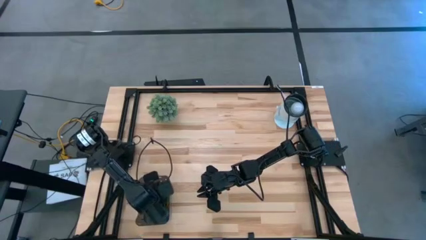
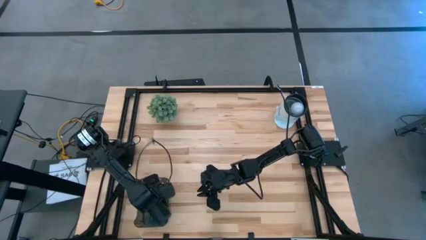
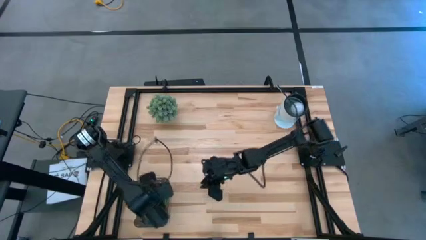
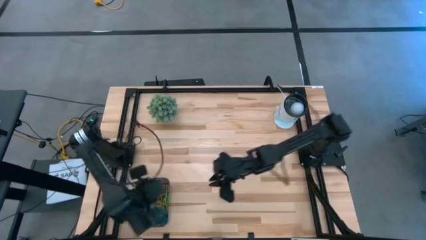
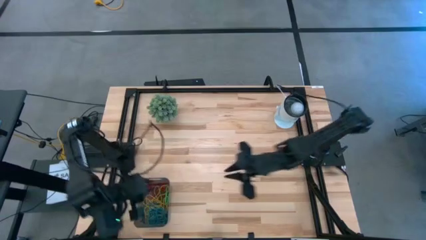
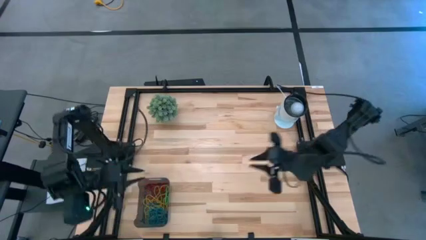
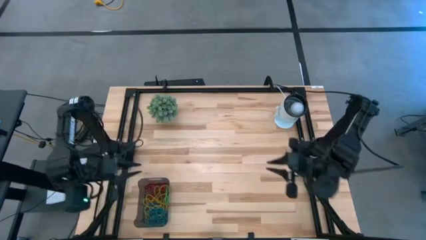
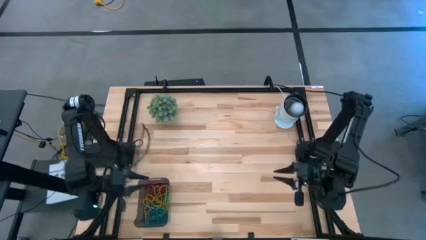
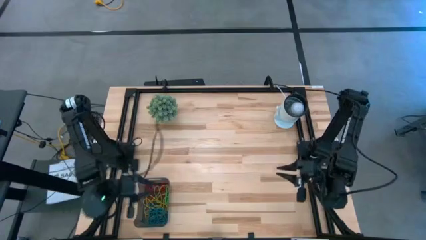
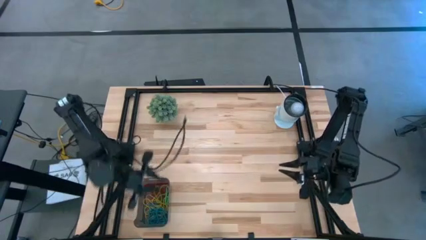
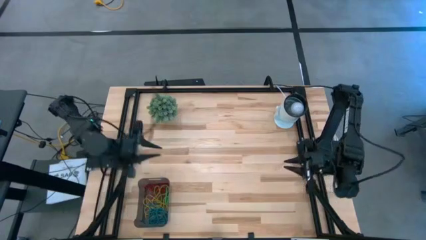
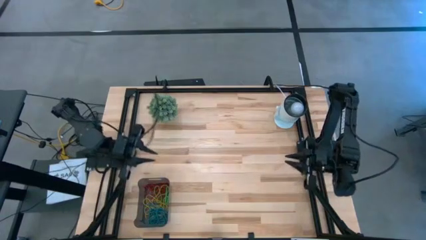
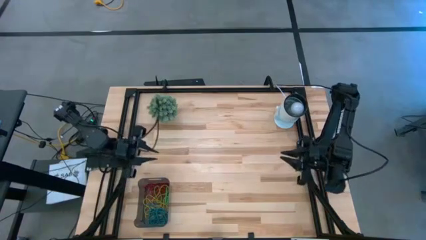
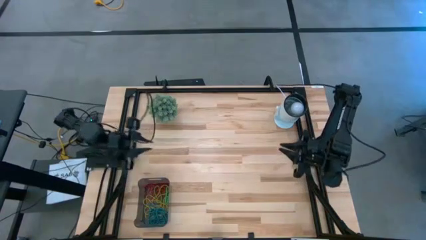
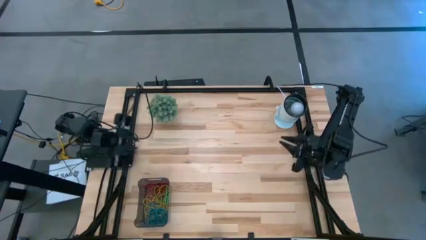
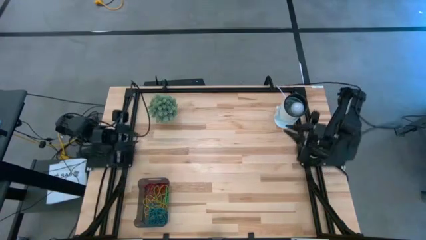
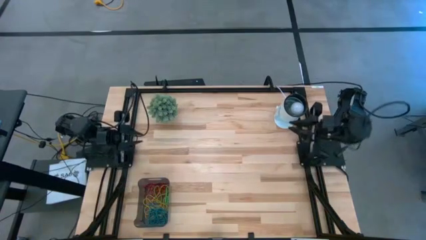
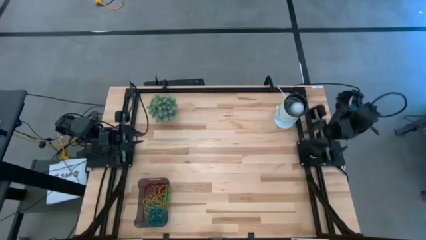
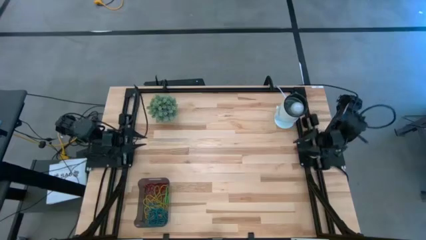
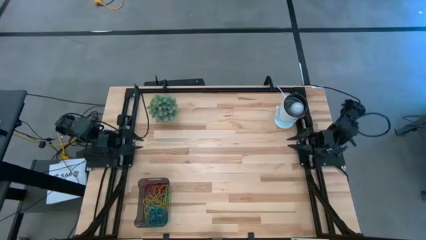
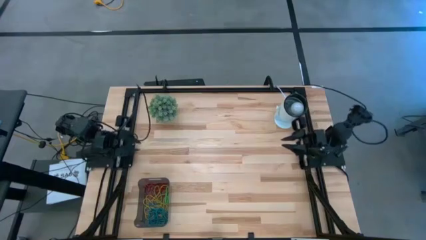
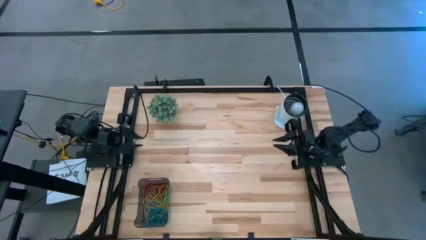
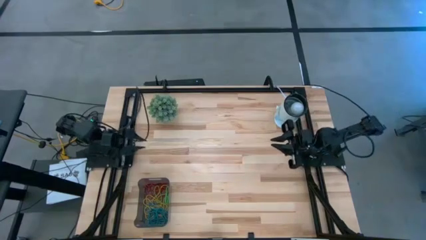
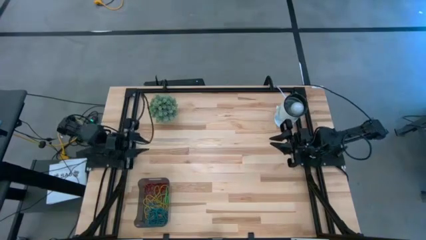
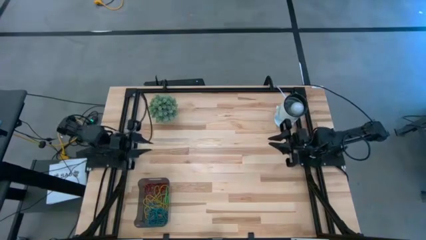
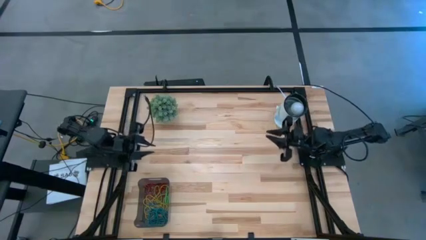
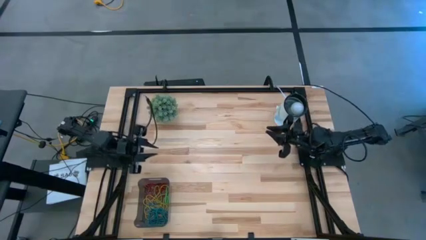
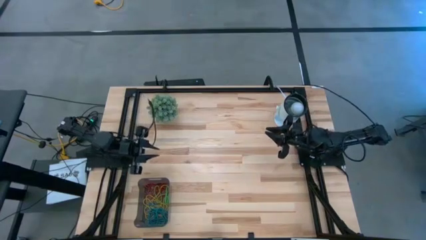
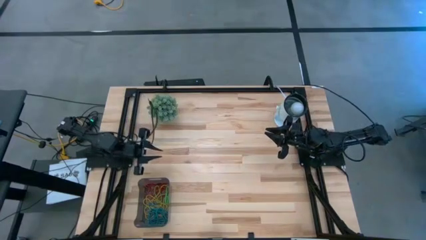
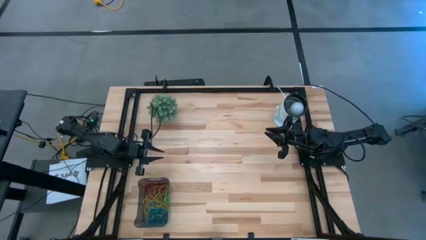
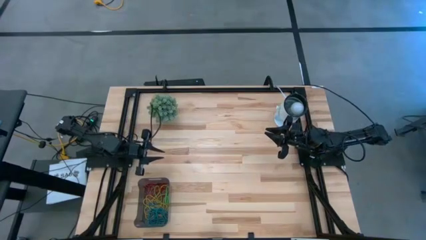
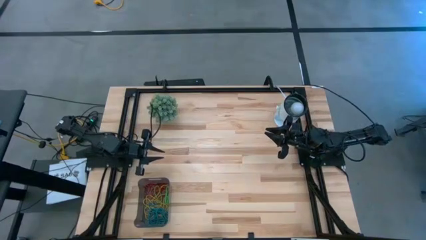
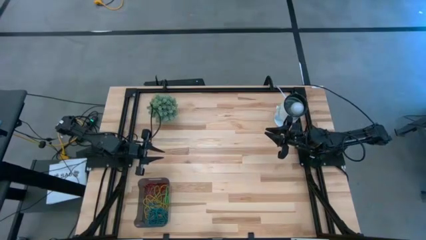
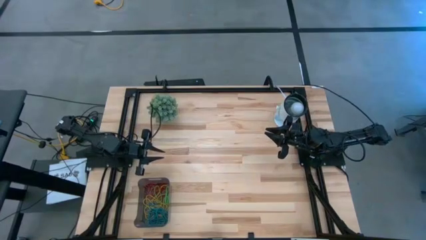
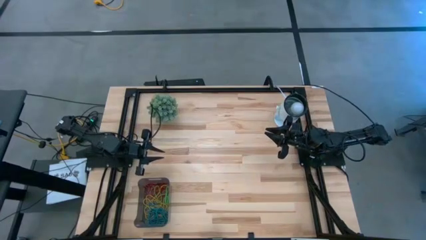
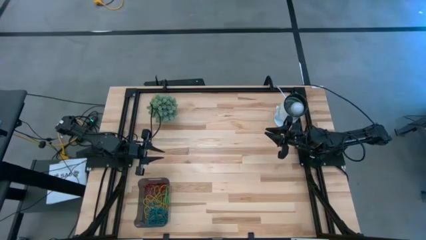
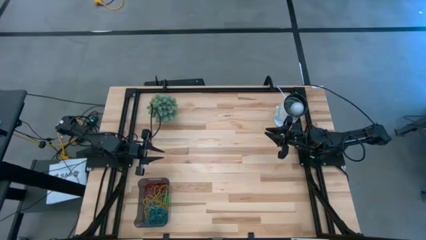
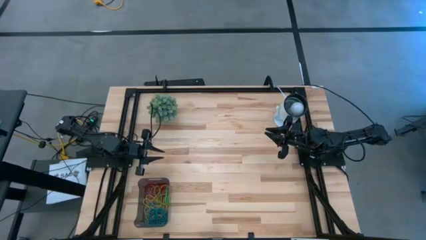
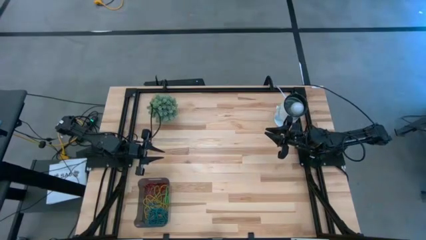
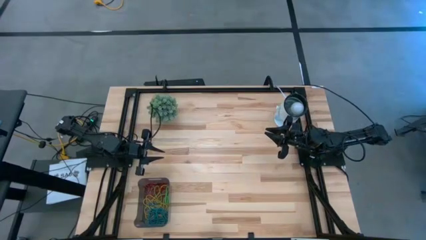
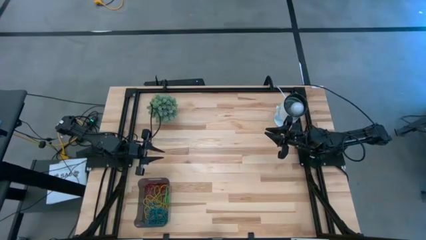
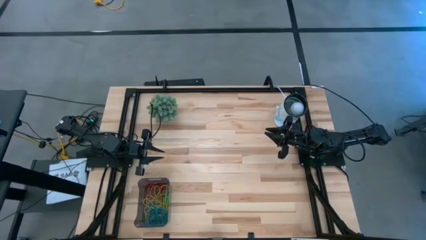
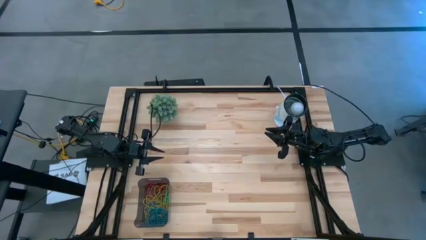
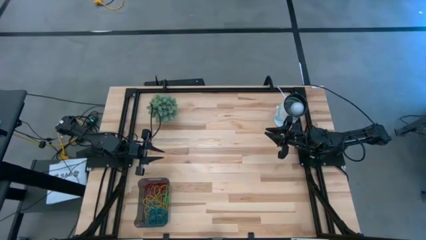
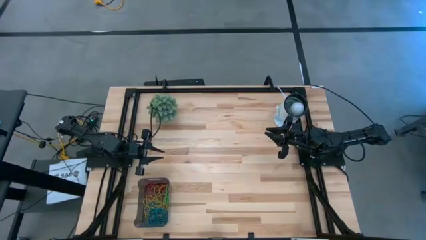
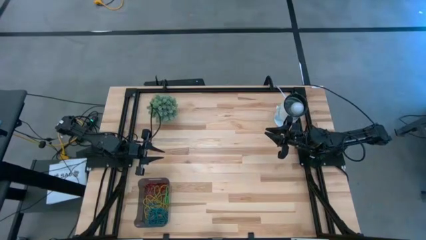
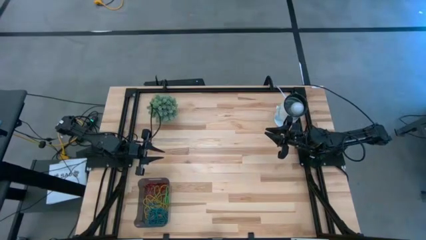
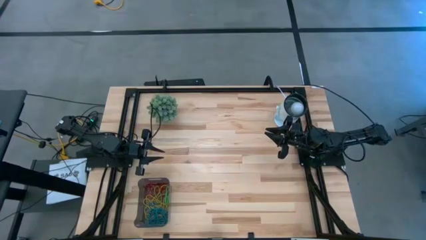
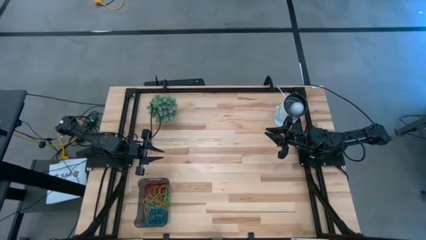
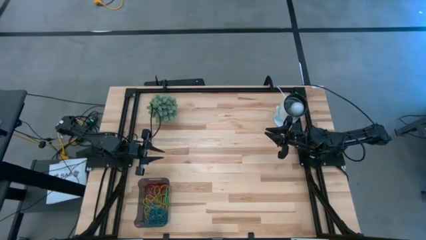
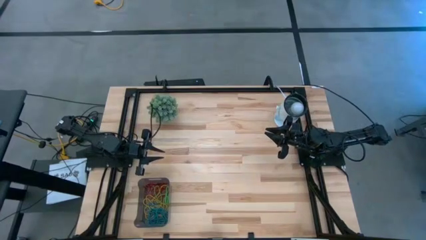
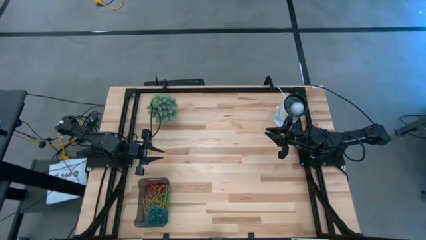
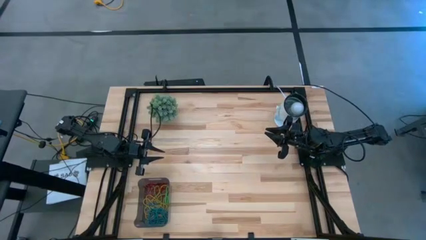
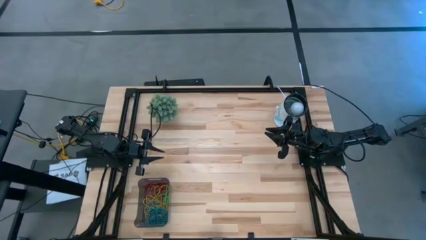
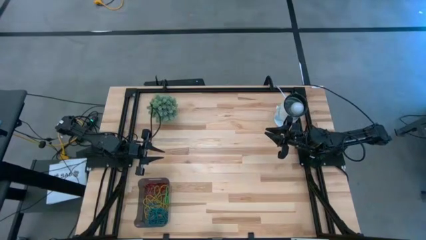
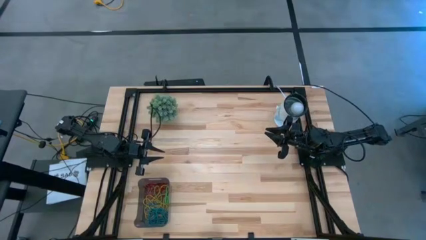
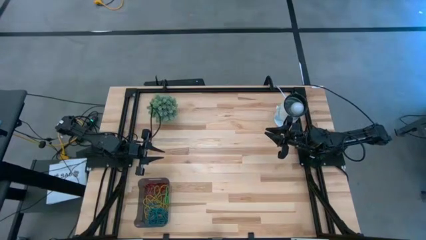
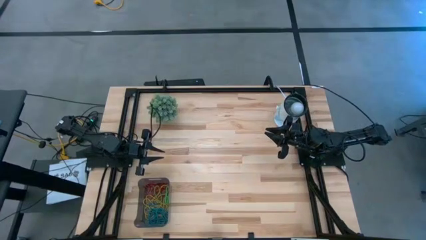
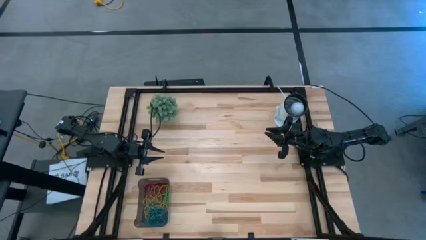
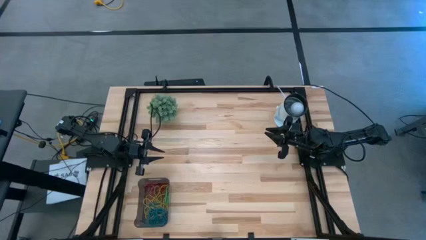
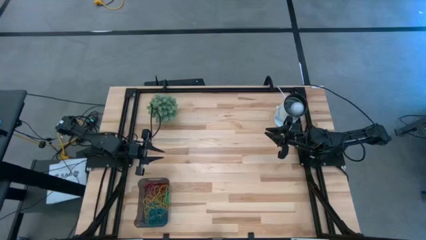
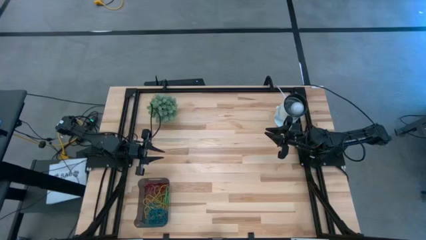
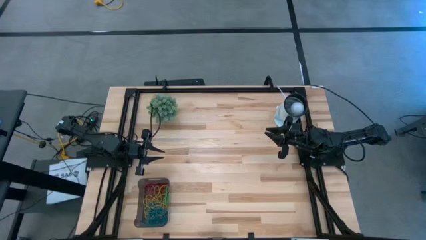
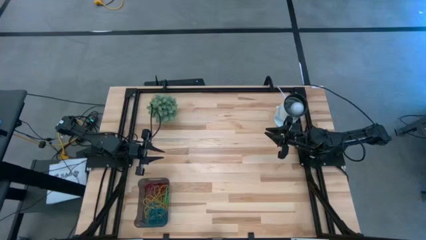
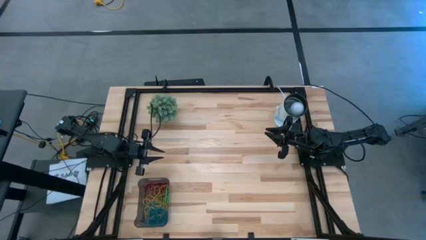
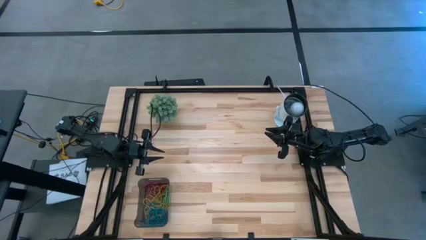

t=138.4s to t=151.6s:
Task: Pick and place items into bin
Return to Home Position
